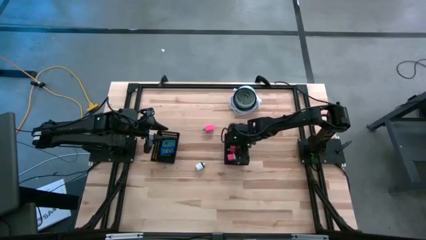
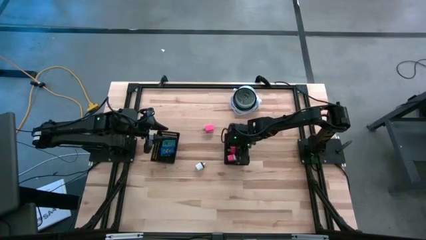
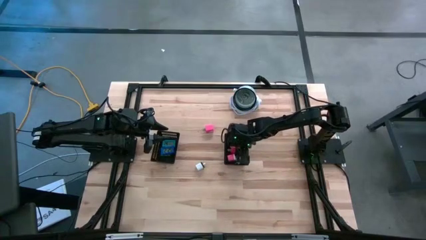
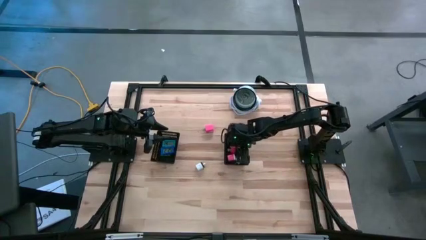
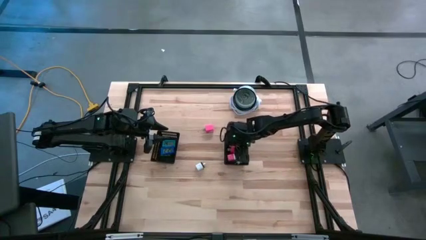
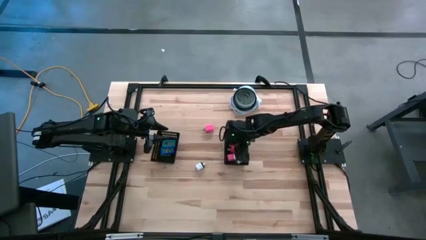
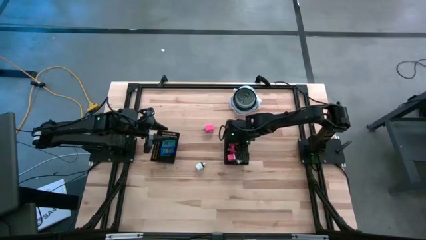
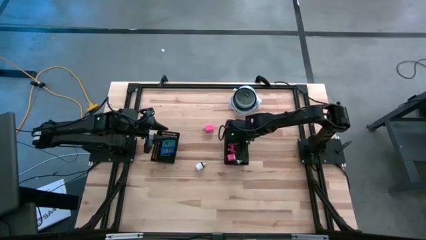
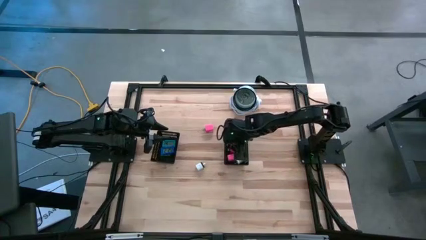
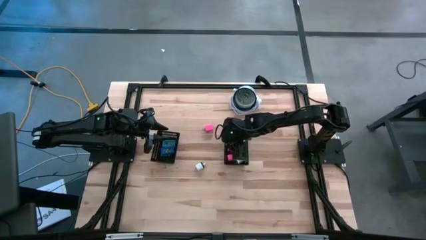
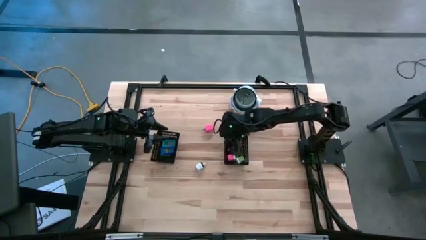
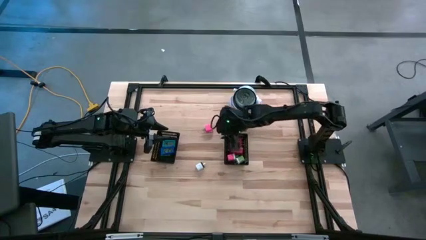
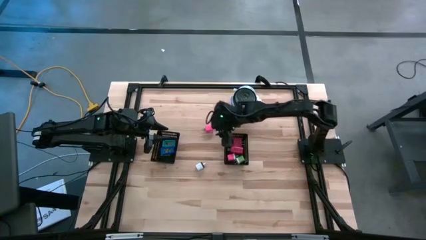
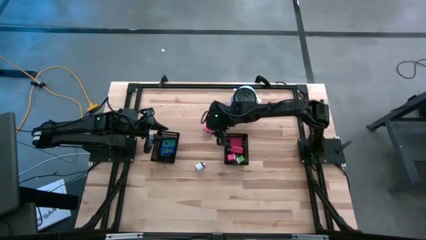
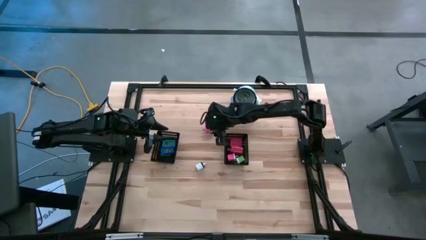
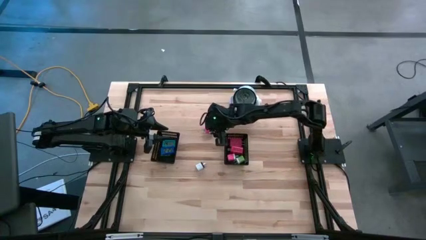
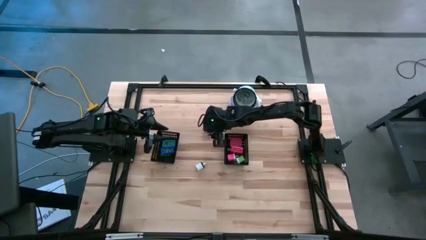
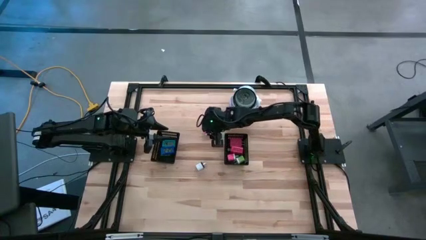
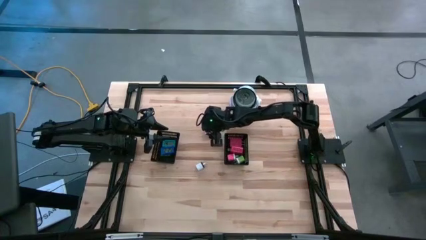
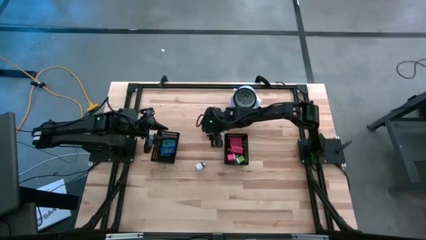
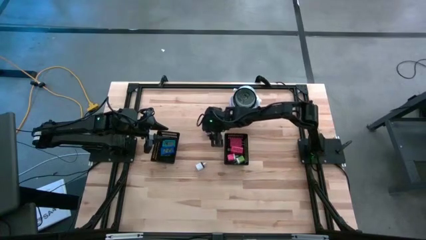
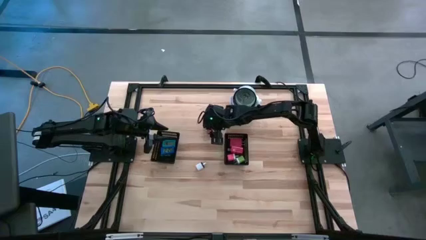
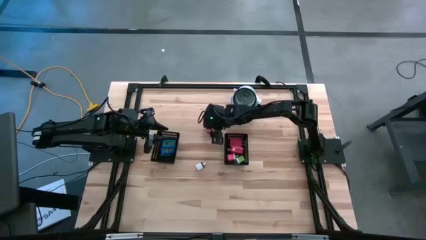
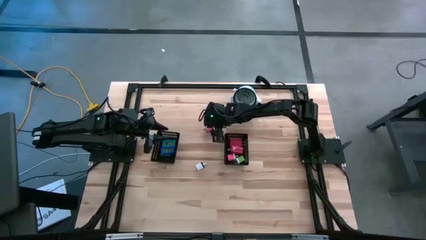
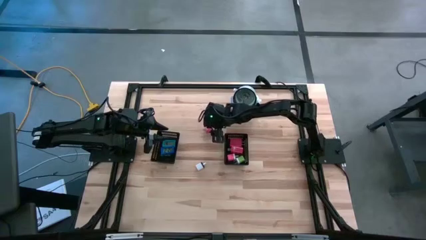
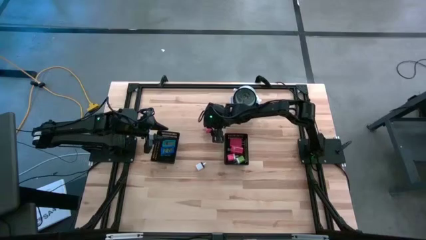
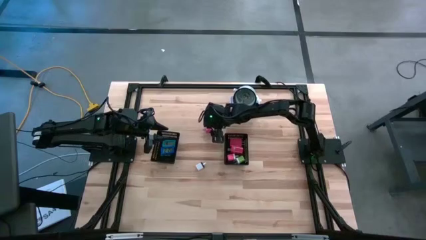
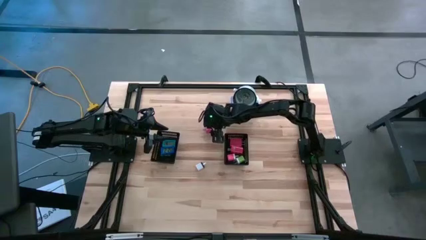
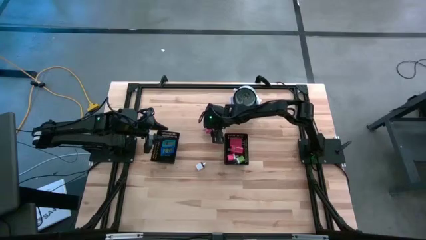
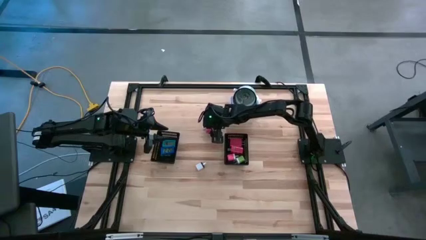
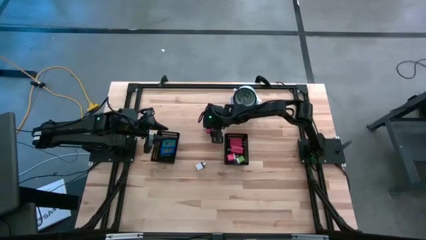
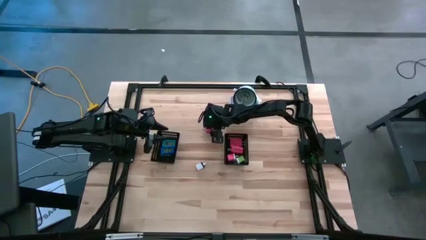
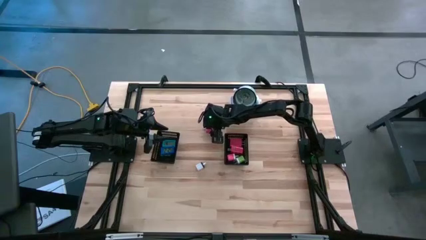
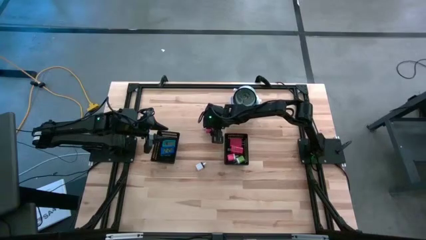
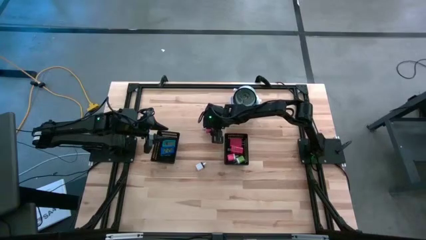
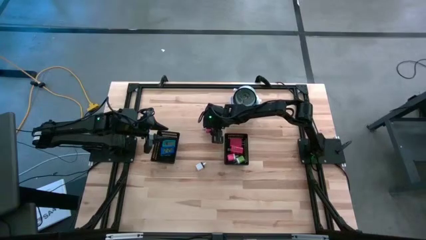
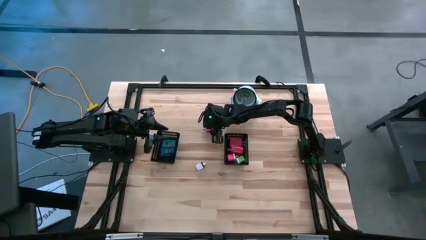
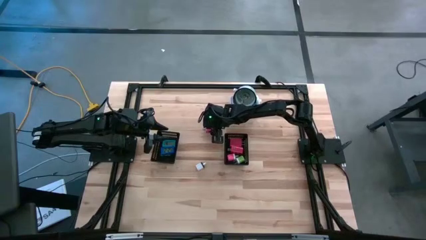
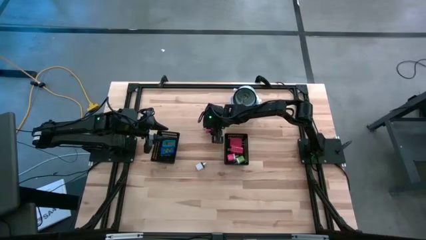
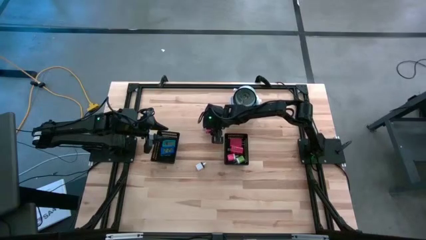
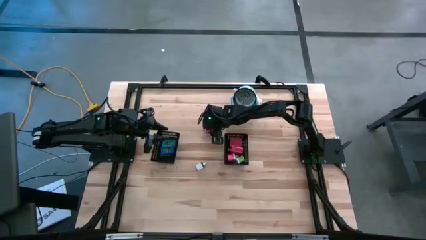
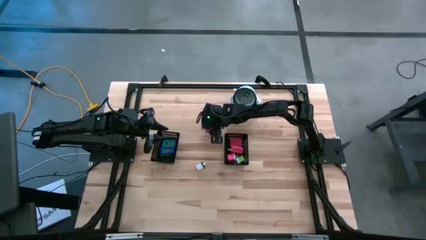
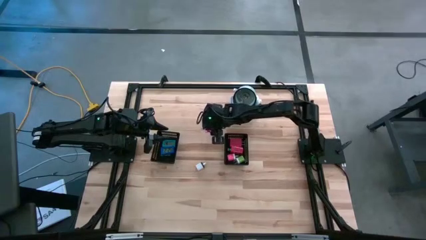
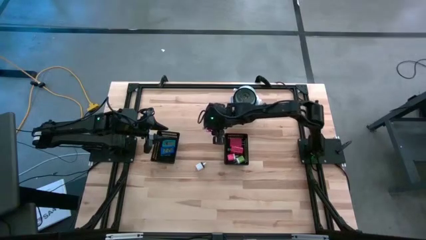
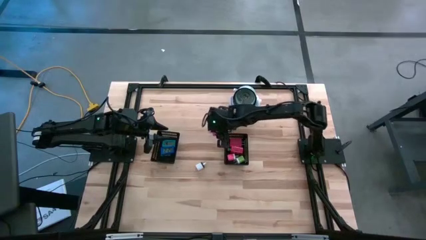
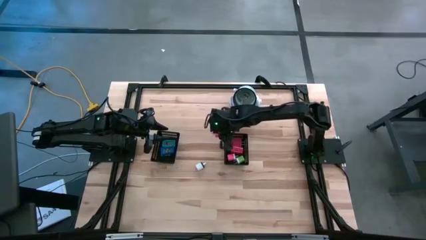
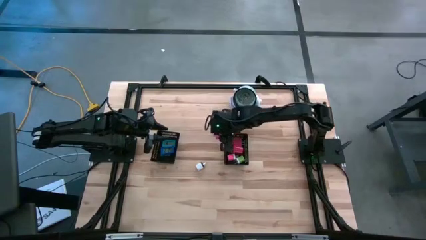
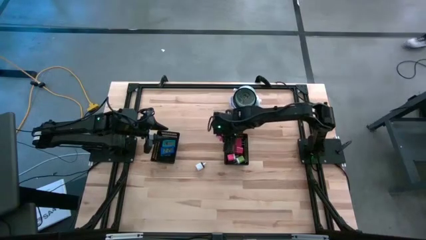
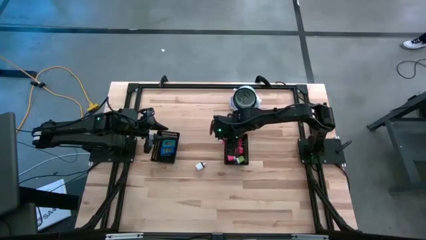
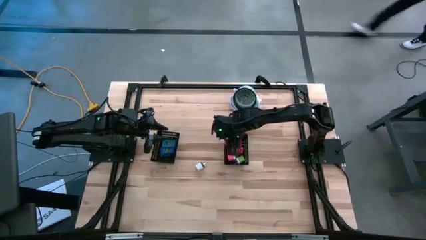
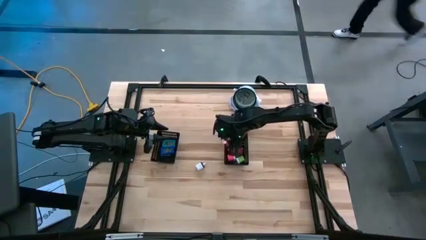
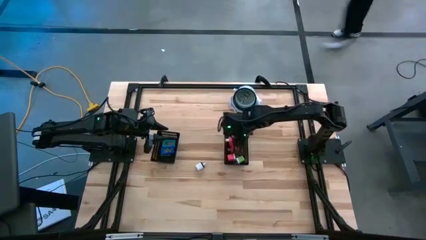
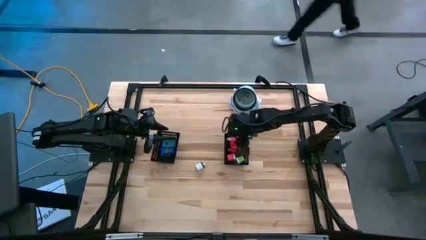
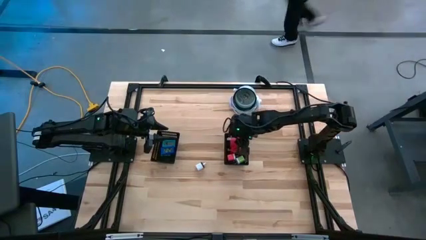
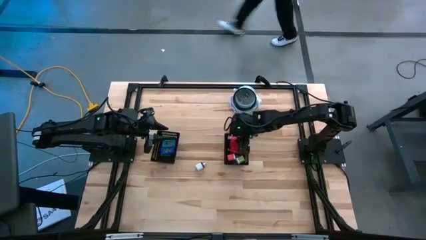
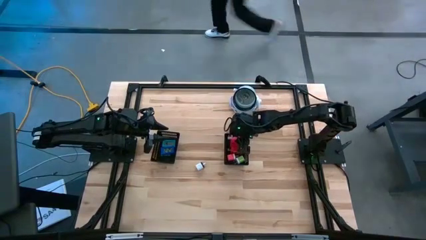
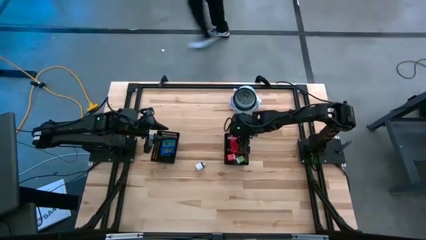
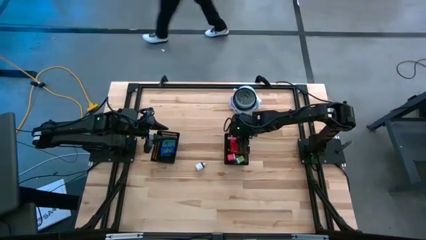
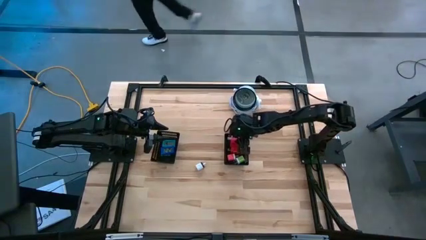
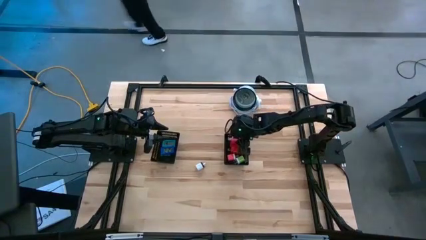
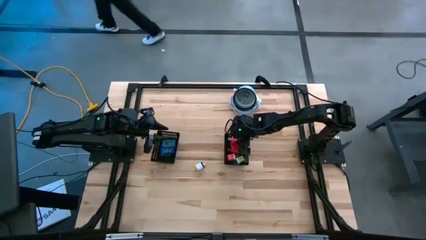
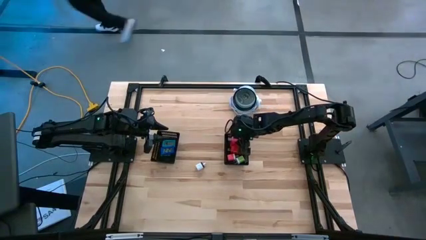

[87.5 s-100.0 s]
Task: Pick & Place Office items
Put the pink charger adapter into the right black bin

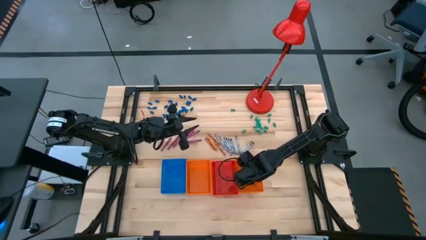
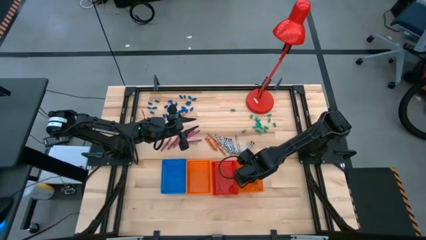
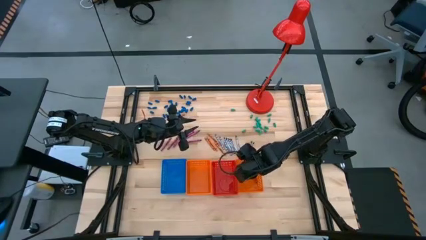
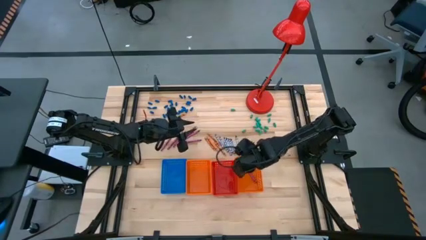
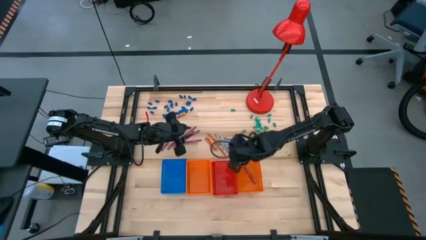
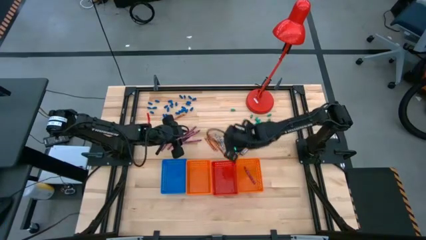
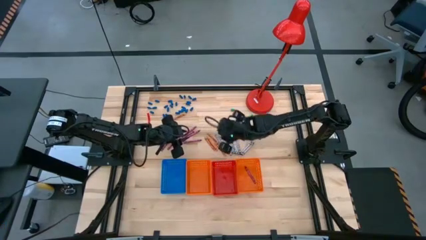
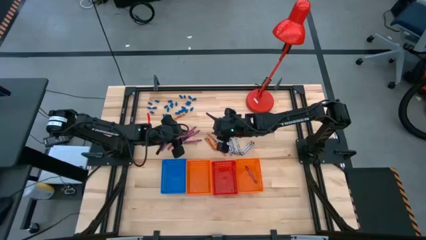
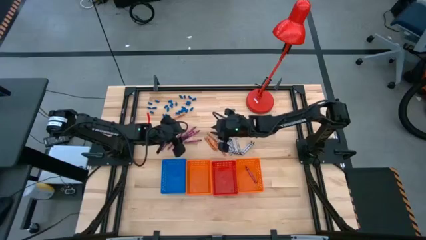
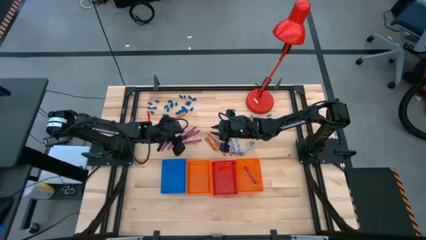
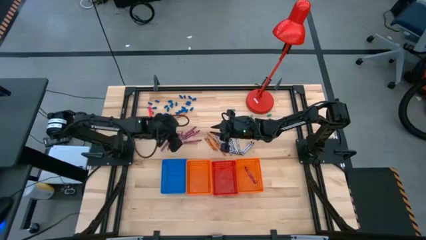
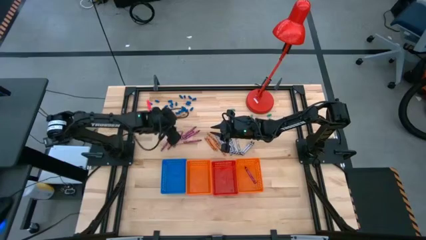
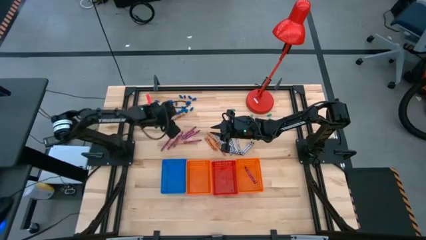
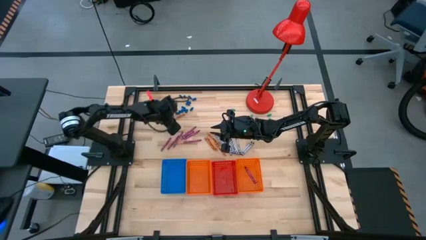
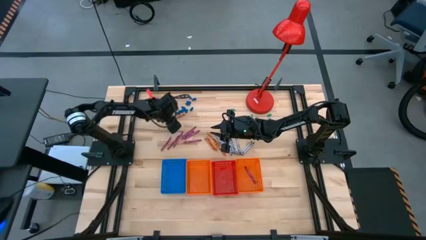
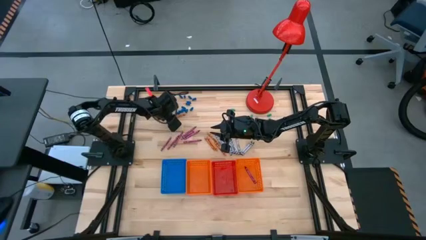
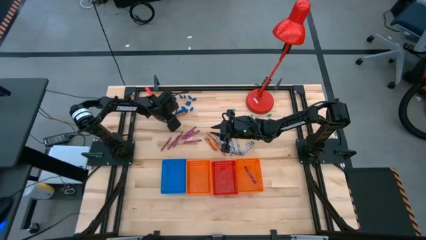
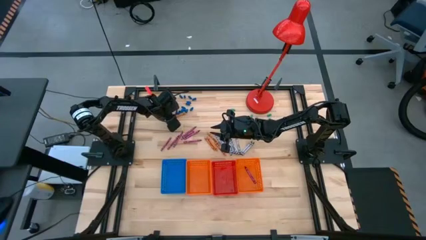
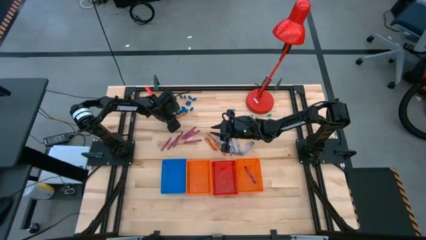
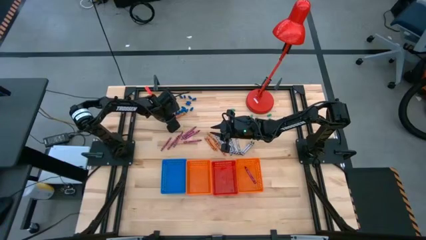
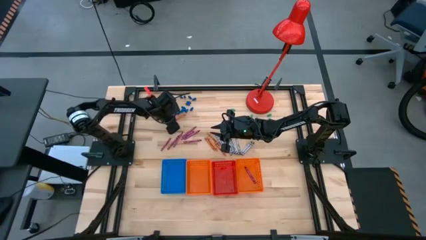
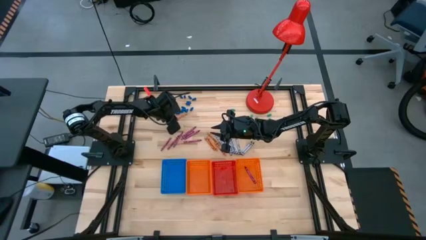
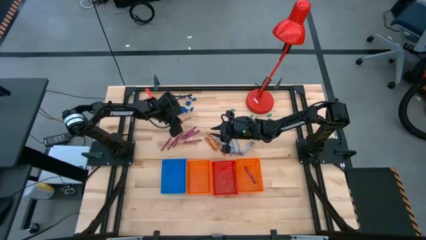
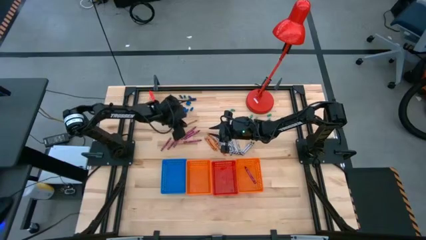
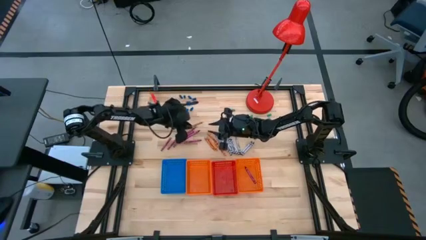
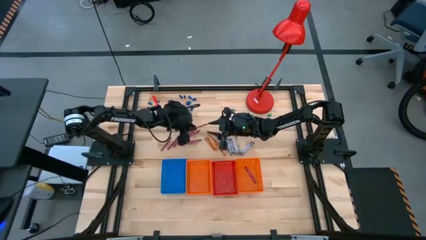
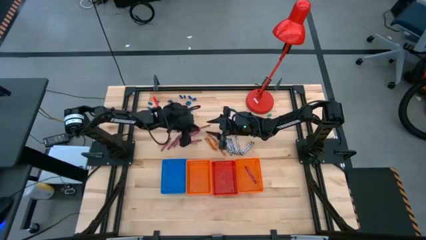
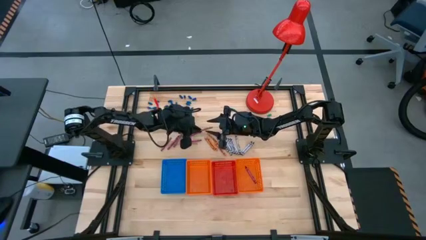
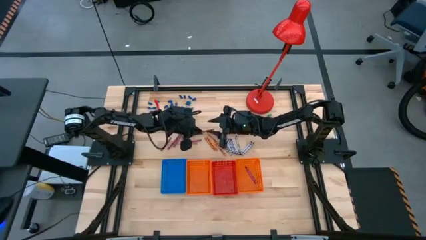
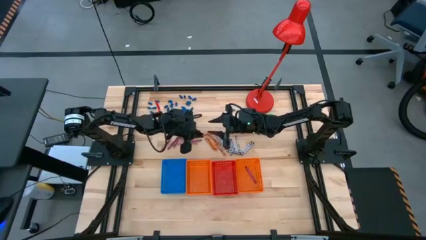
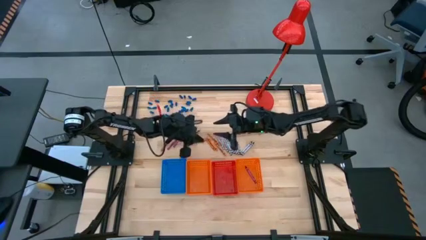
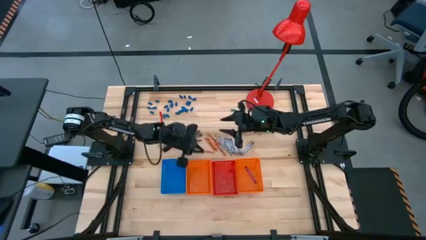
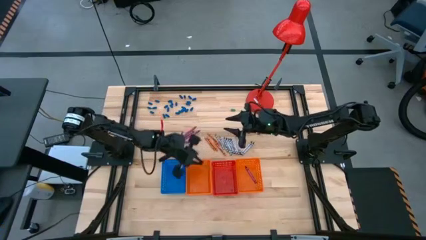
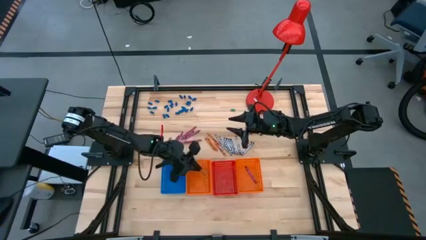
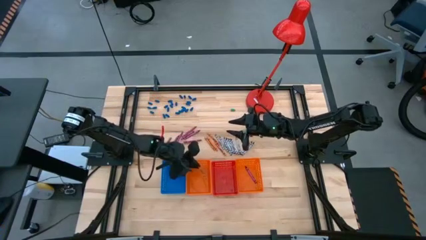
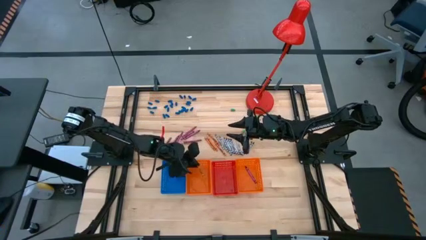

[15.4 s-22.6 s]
Task: Sort crayons
Put the orange crayon into the left orange bin
